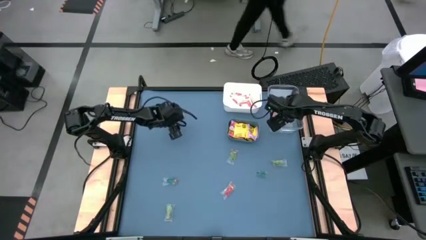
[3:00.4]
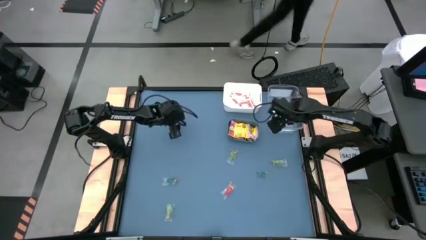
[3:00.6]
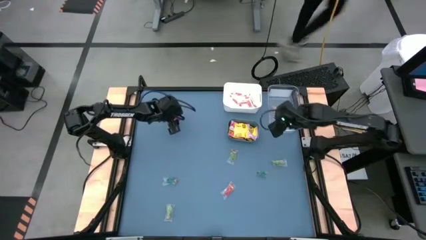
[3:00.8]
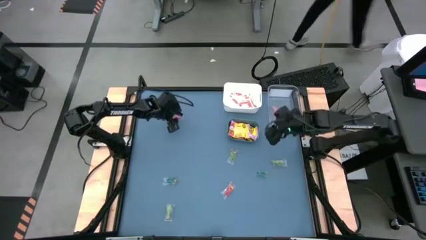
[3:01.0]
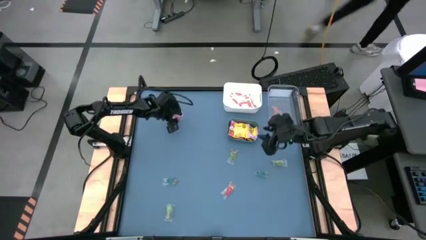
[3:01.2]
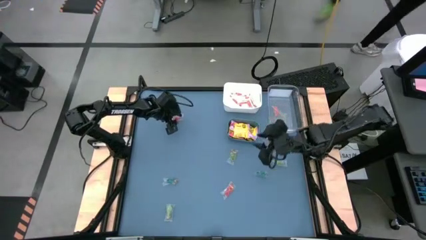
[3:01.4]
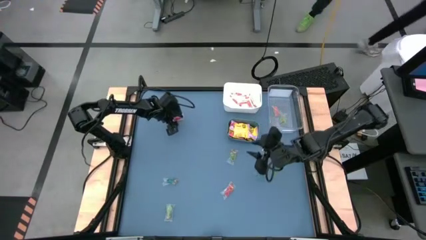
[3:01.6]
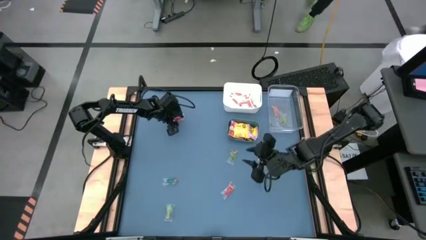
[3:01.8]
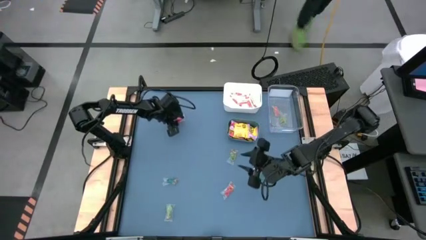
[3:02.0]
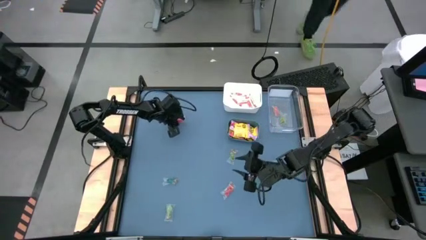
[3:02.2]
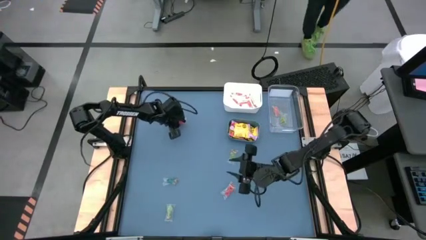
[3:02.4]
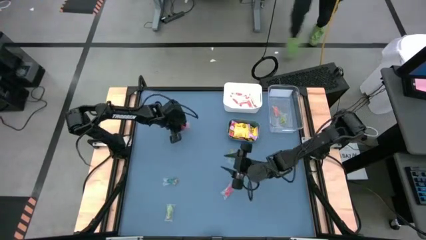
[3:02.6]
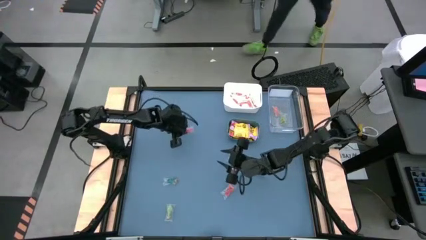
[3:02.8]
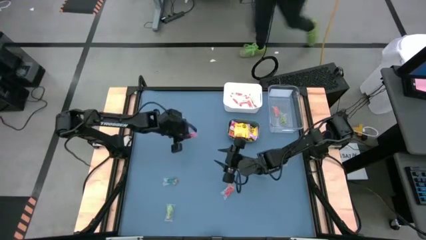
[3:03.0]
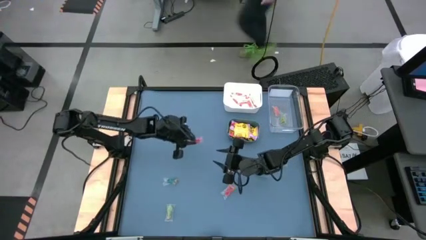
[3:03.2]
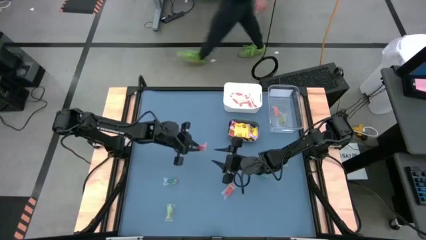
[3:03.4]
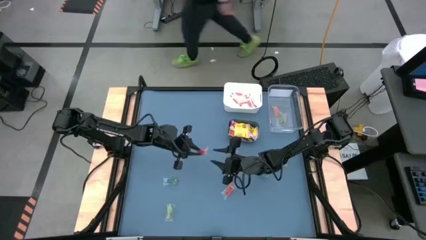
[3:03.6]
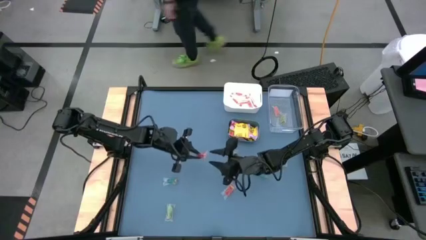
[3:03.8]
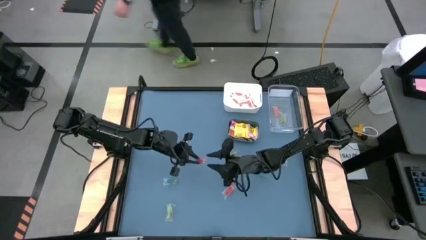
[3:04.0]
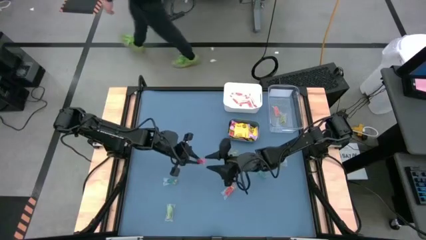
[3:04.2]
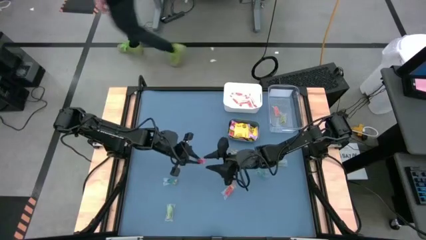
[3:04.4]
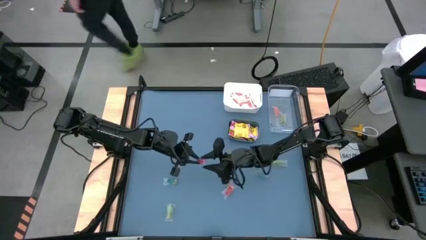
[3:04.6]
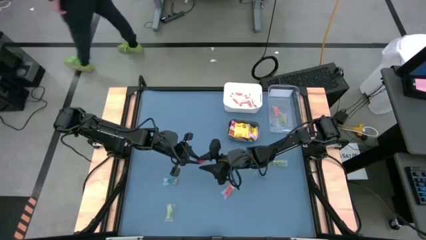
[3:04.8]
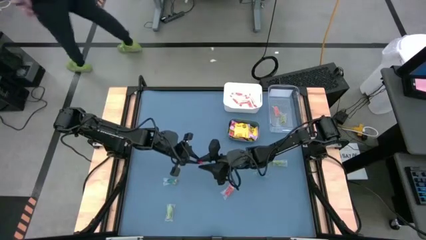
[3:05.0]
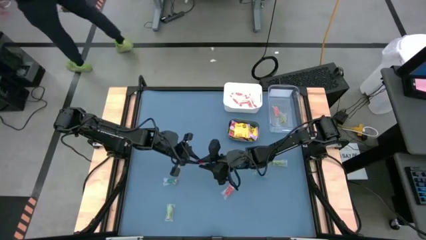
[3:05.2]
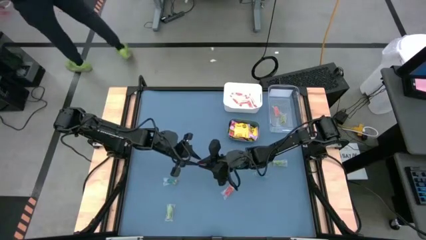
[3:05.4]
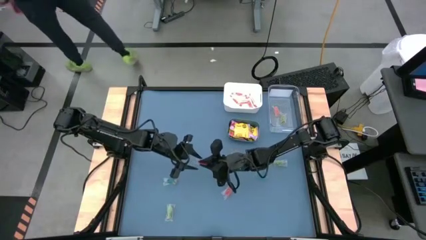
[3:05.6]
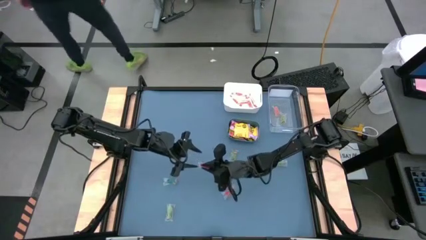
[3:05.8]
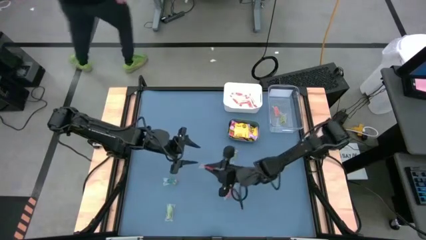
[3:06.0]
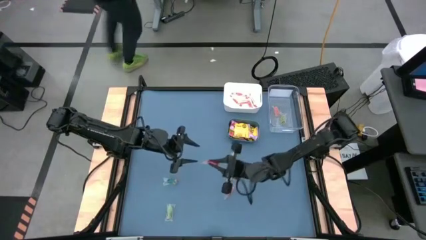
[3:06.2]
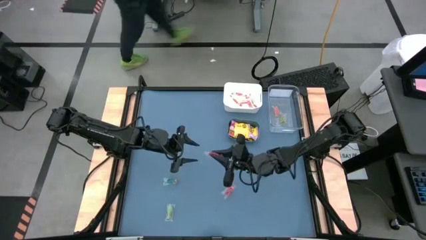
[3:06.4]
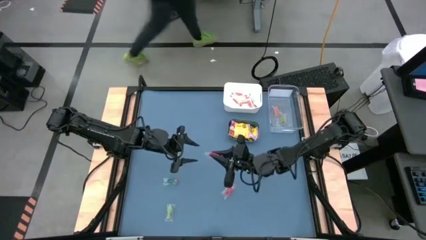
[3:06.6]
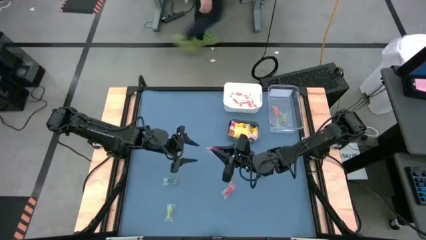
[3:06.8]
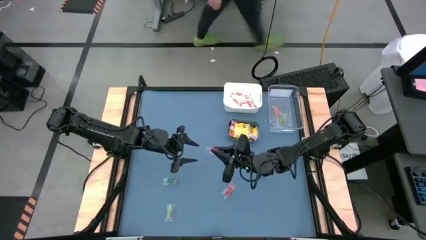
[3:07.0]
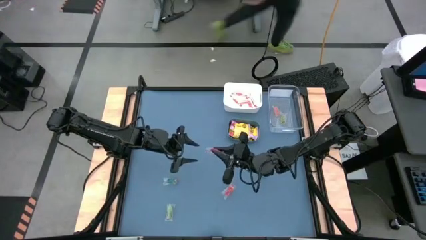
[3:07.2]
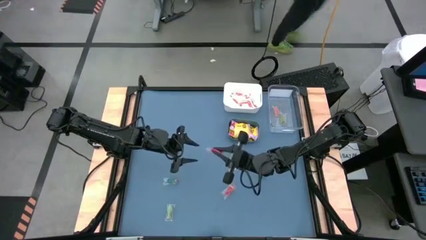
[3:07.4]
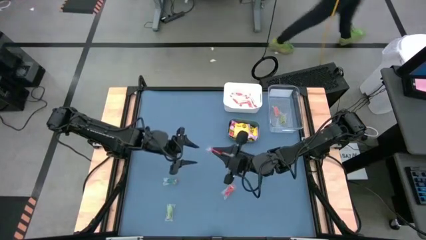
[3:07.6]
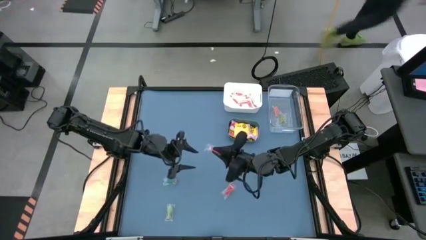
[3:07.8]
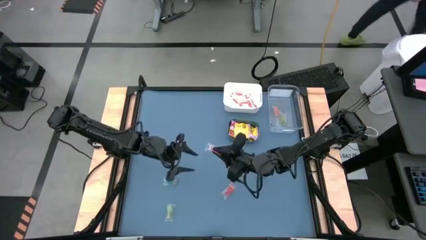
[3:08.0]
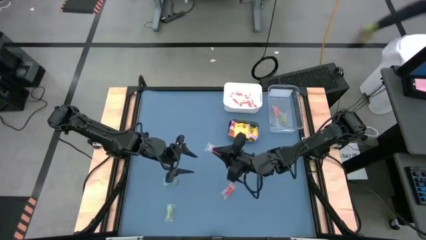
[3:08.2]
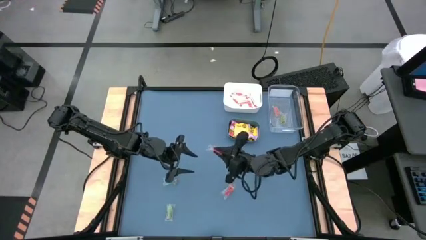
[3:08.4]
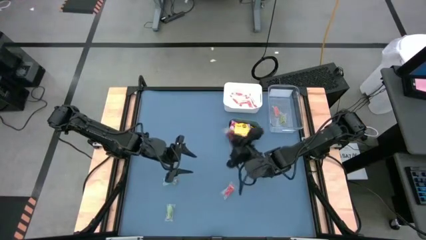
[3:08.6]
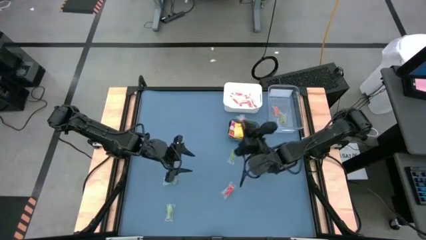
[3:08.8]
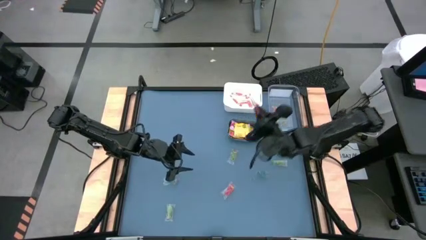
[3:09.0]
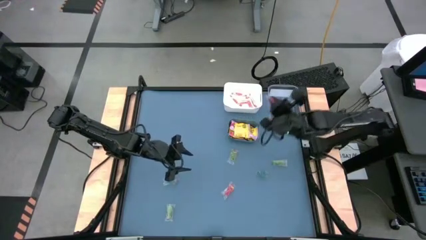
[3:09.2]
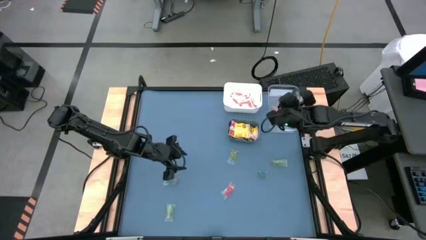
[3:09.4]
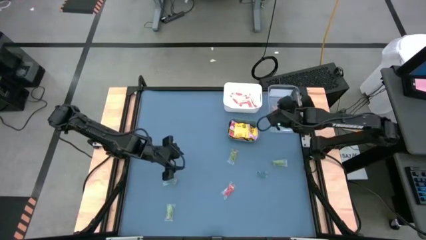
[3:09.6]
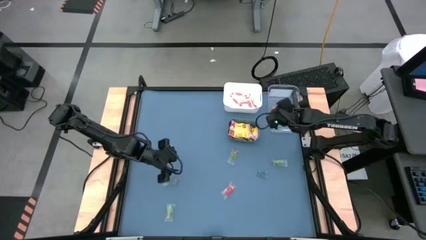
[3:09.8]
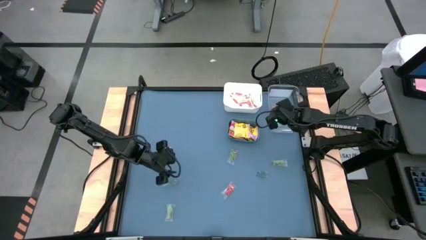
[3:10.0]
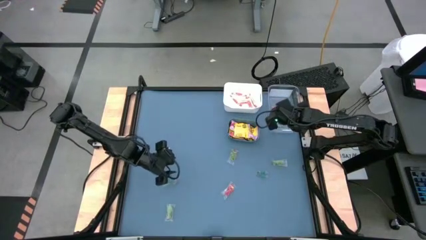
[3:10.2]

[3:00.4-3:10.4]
Task: Sort candy
Put the top left red candy into the transparent bin

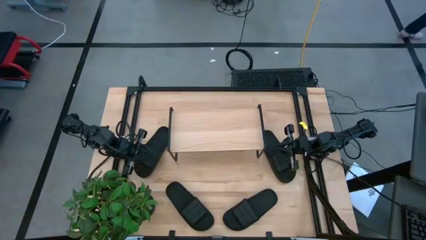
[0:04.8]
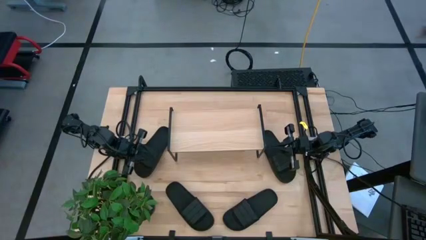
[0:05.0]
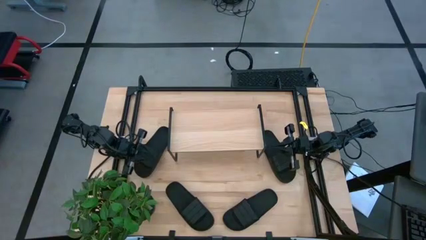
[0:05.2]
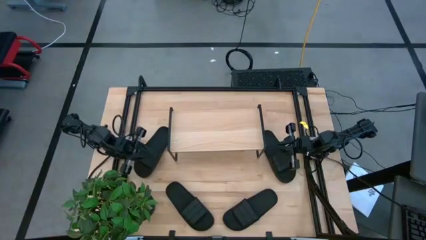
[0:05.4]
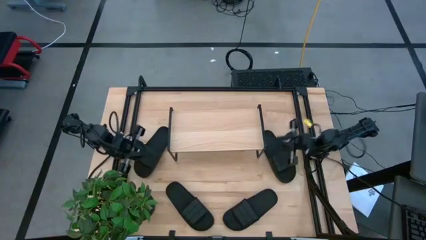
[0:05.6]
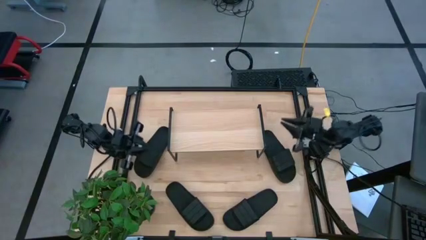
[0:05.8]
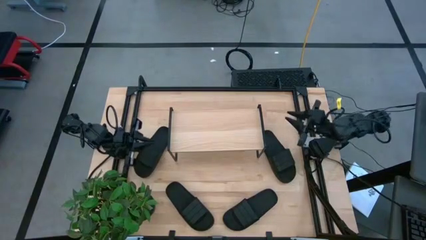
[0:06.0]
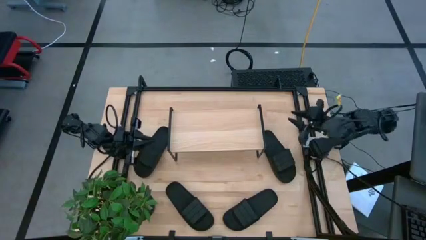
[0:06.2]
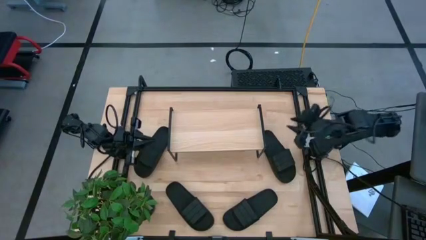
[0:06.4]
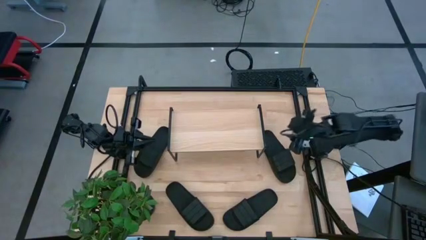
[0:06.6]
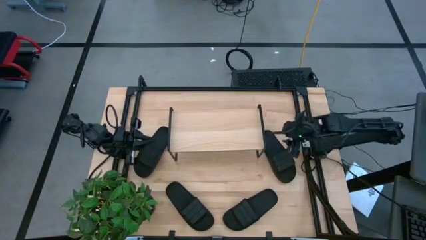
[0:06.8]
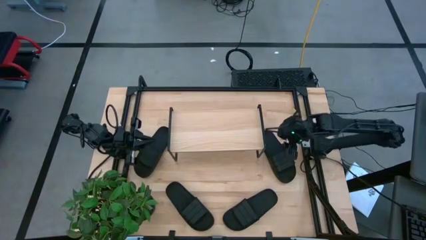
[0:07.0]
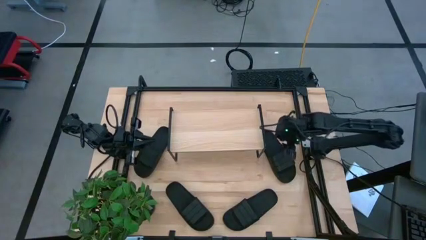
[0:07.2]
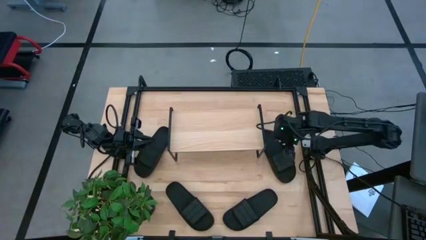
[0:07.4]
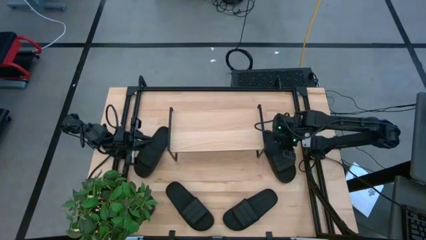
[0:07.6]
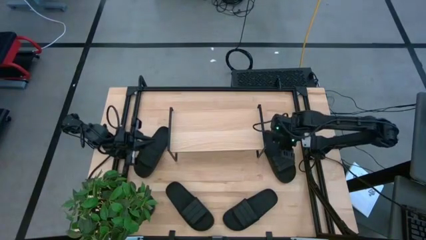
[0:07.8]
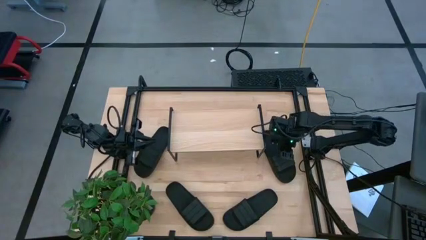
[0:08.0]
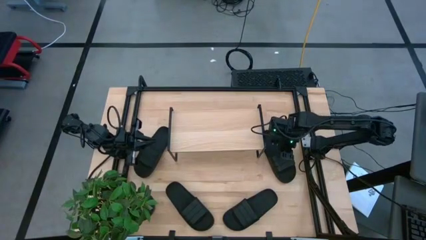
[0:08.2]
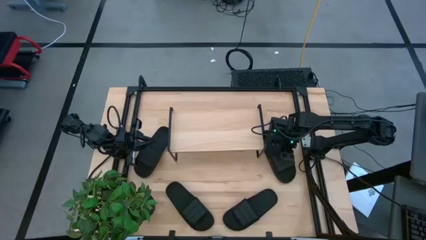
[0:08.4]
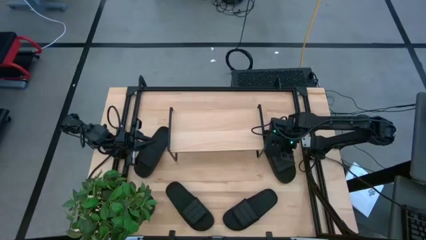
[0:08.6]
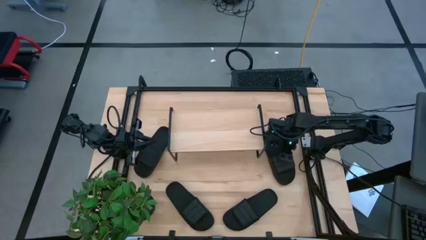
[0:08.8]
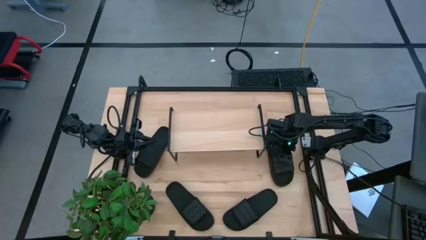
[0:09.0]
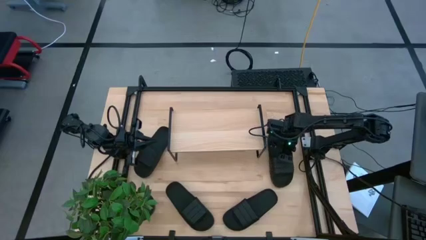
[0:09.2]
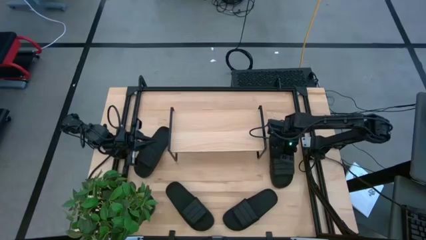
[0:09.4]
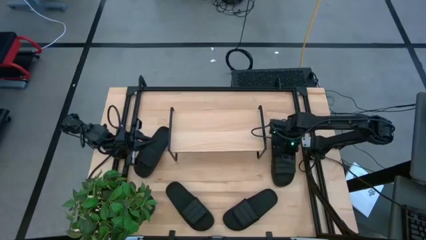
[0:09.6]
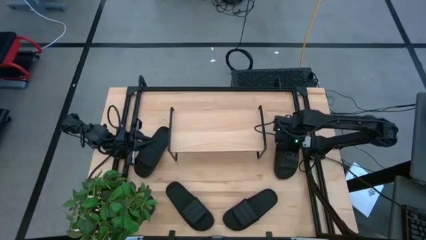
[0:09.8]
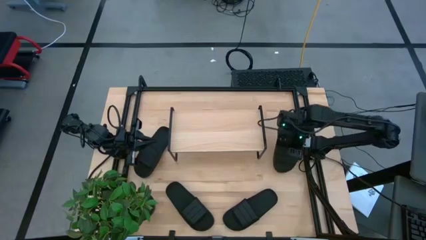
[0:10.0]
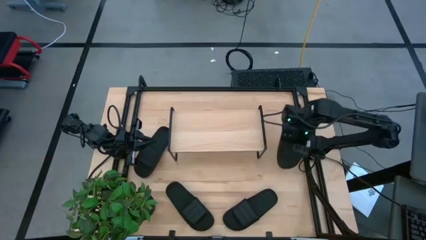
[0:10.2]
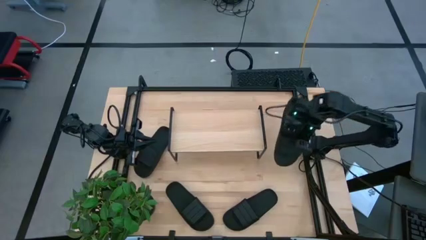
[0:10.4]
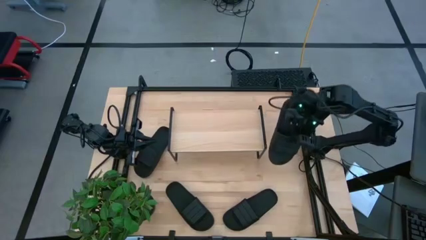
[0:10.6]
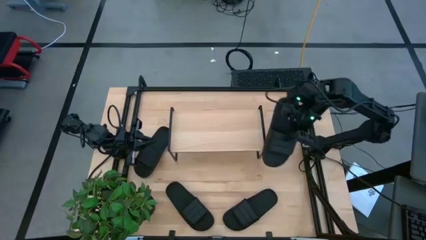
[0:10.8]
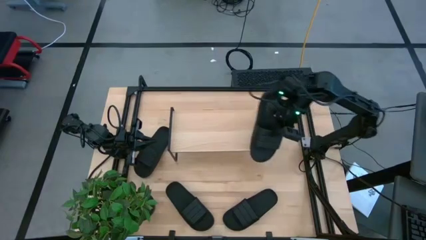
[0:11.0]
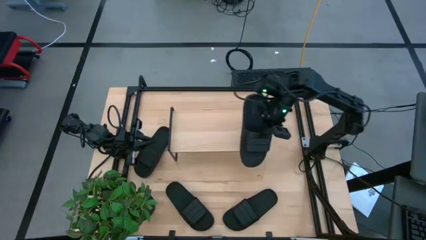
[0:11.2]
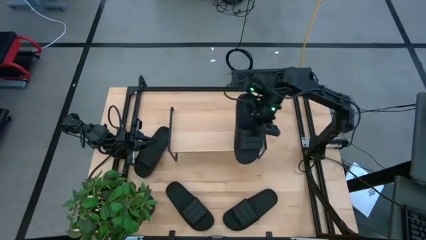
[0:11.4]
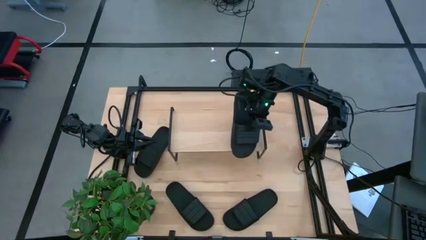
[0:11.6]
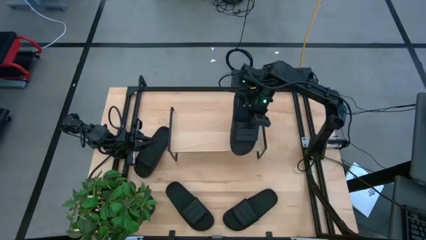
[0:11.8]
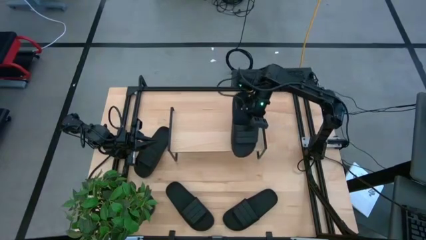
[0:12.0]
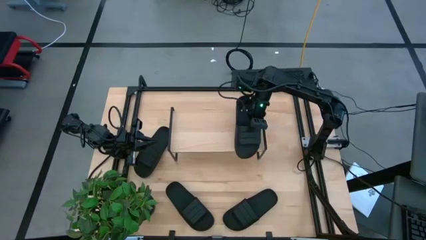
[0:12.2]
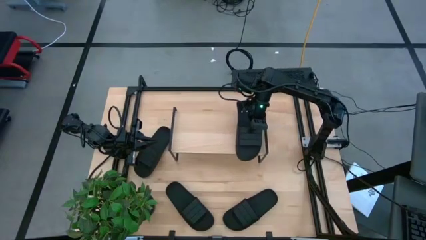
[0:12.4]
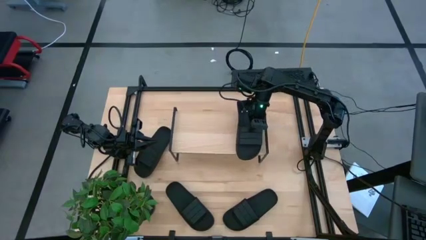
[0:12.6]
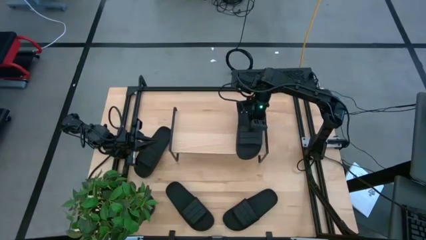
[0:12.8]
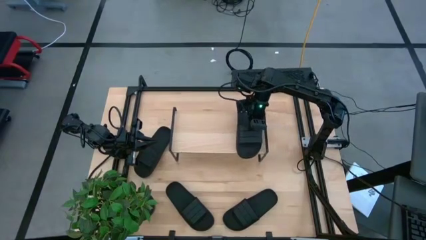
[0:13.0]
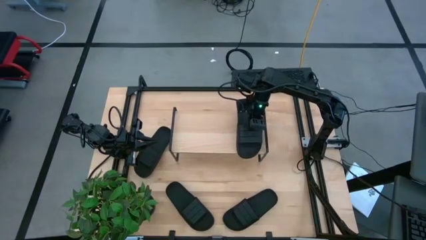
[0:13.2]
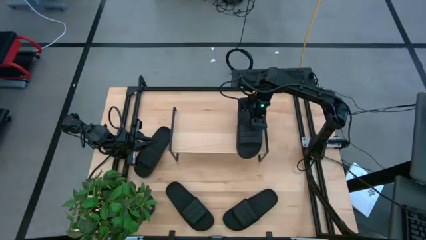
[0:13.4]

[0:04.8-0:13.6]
Task: Pick and place slides into the shelf
Put the top right slide on the shelf
